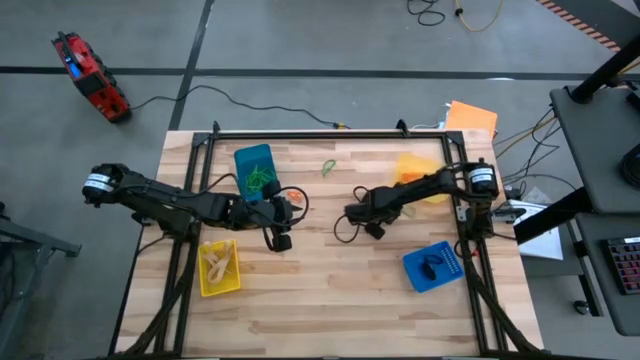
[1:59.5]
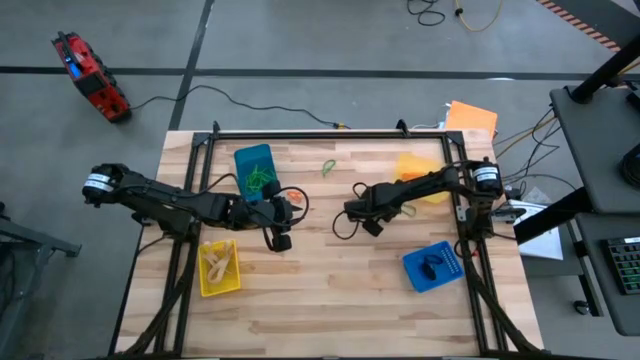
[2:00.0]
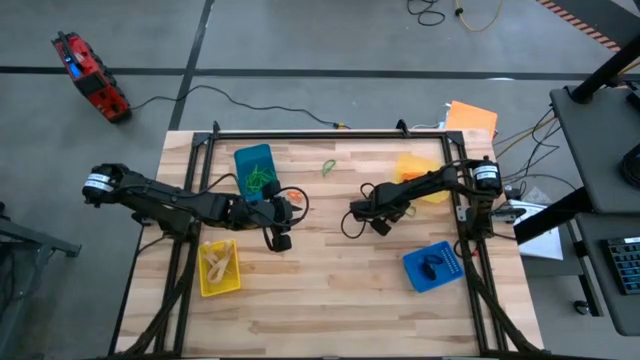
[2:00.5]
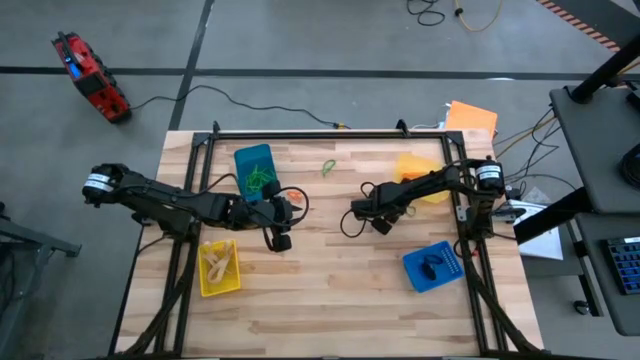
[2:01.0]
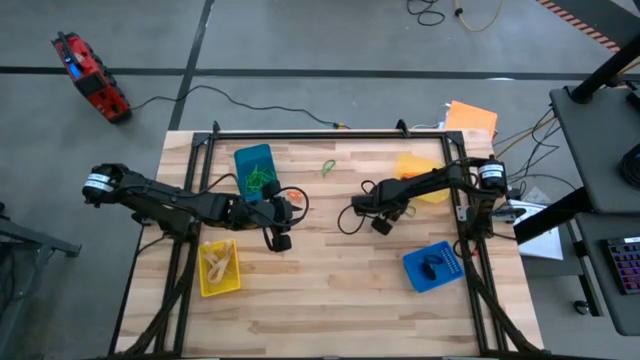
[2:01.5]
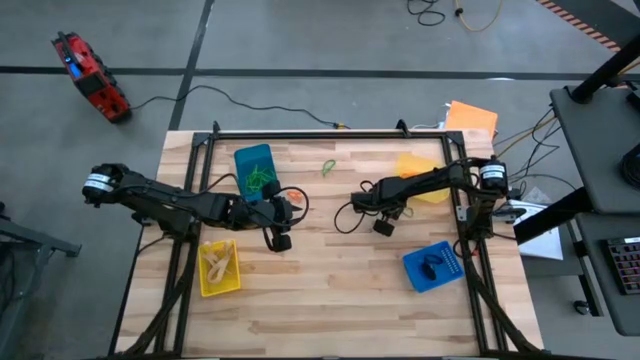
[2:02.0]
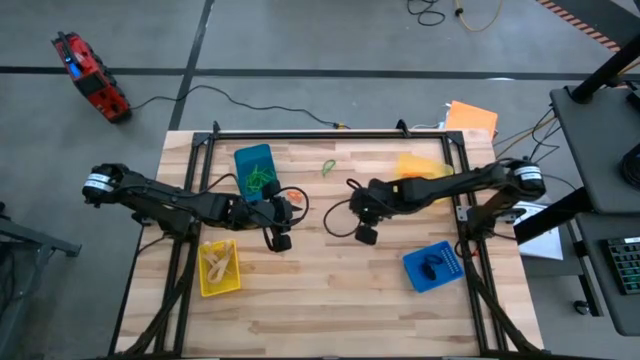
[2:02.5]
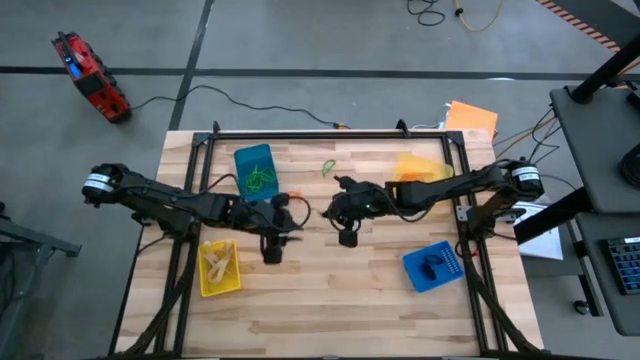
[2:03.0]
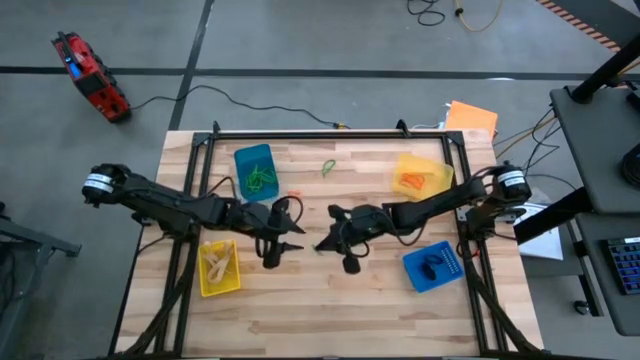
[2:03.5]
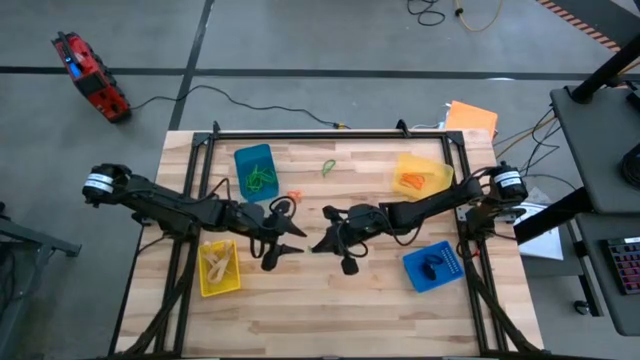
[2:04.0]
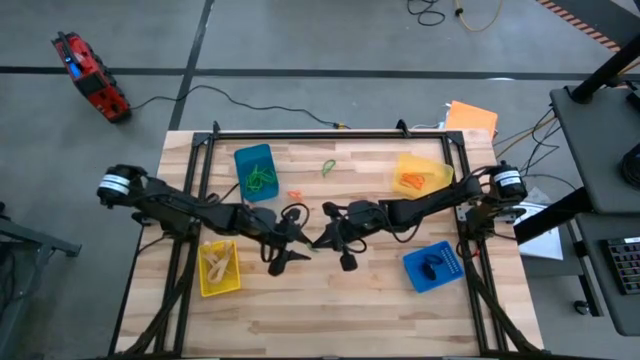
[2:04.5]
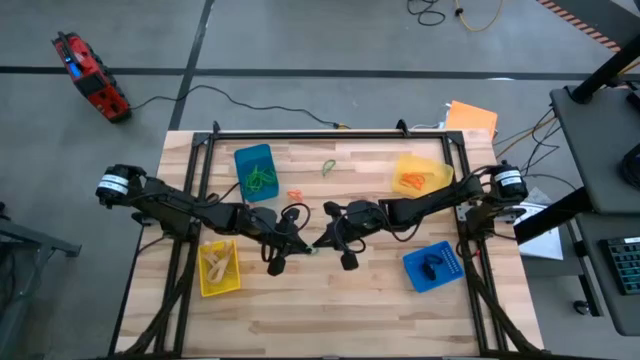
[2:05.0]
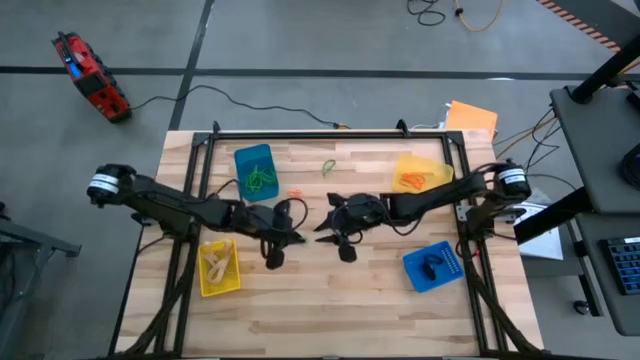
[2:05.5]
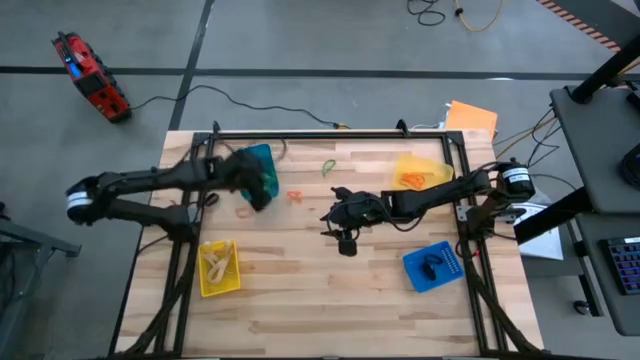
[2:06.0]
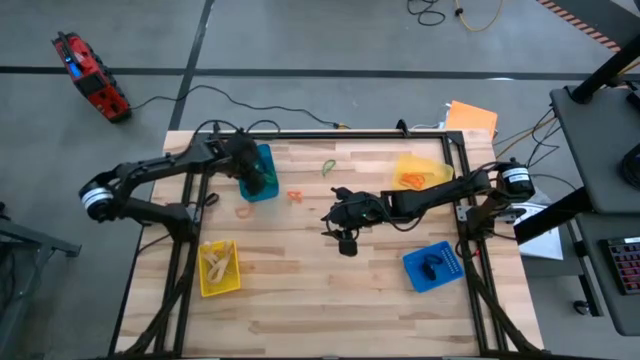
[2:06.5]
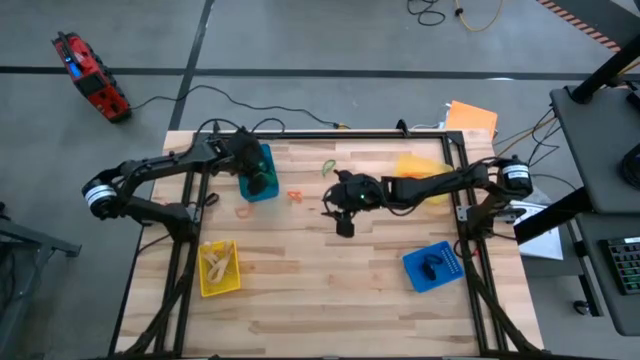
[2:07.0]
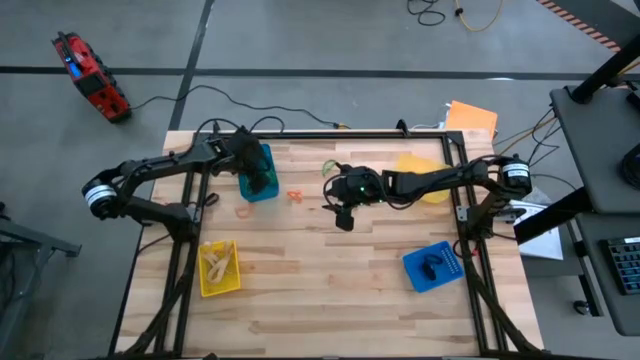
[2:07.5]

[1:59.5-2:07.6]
Task: Sort rubber bands into baskets
Put the green rubber band into the light blue bin

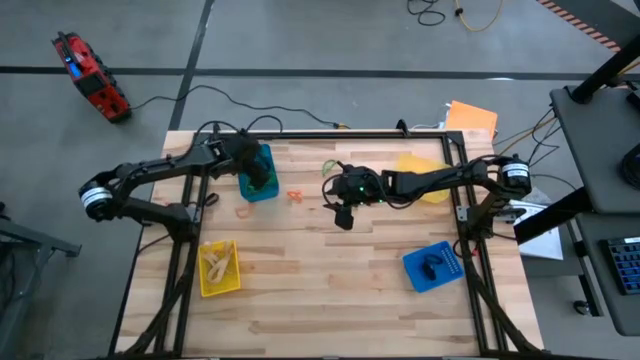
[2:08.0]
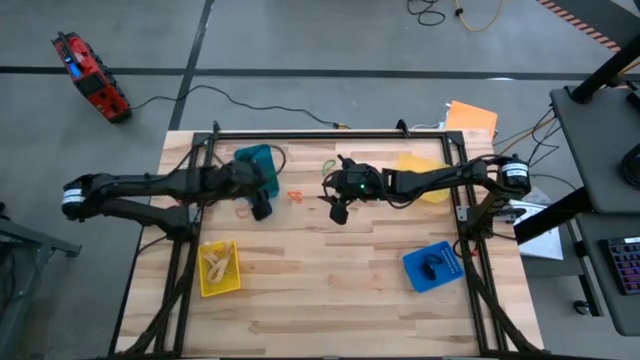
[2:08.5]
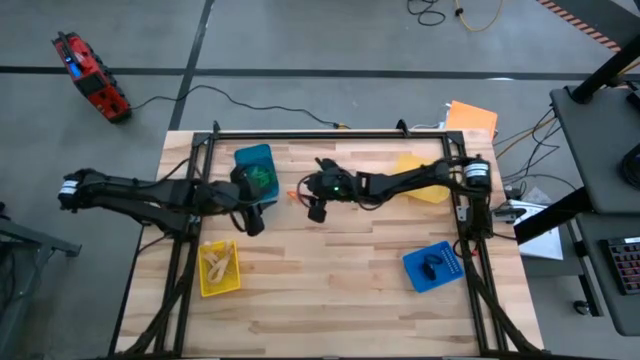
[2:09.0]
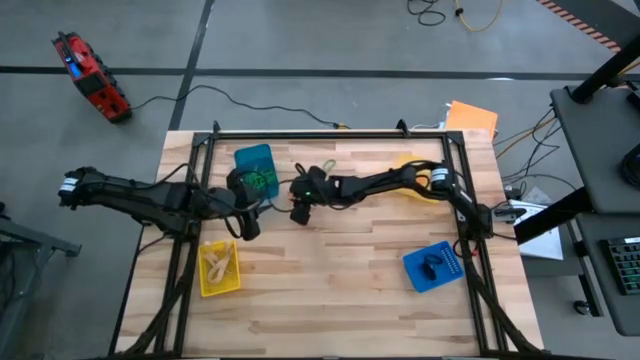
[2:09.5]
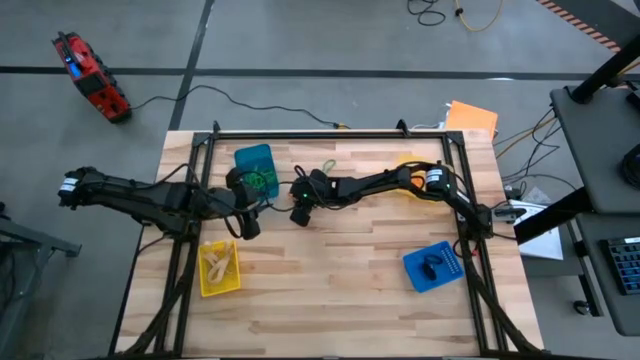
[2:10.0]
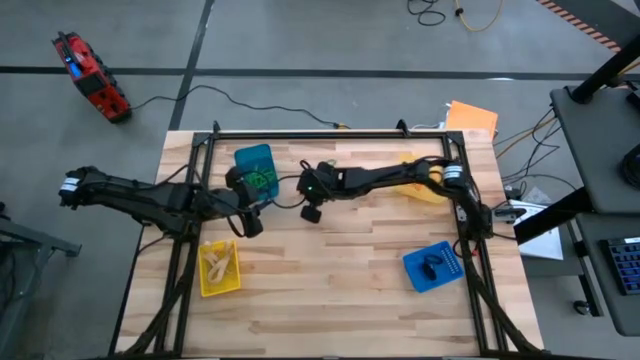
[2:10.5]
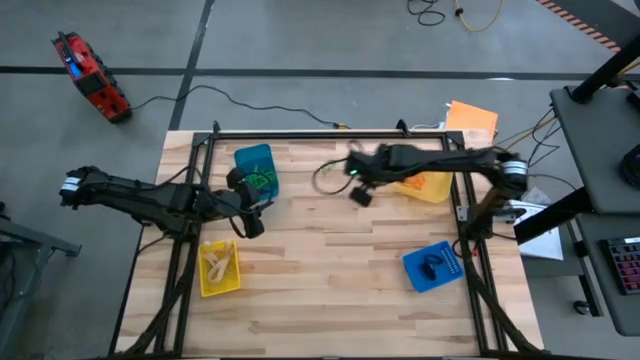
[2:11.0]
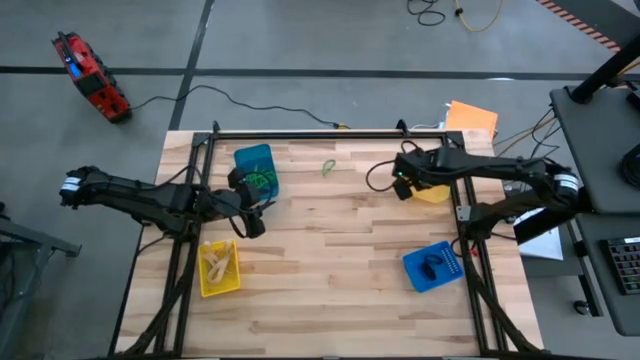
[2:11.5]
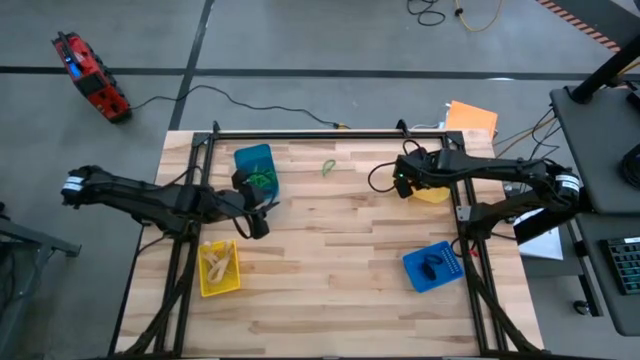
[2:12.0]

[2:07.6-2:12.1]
Put the orange rubber band into the light yellow bin

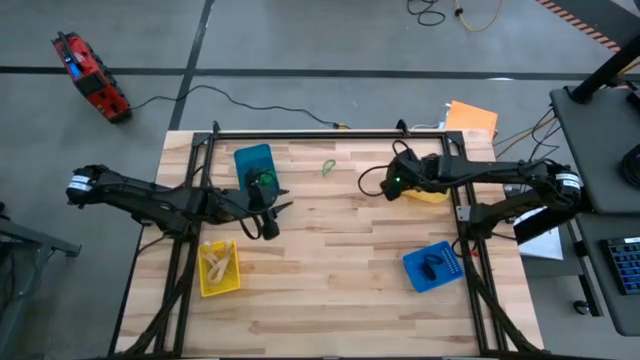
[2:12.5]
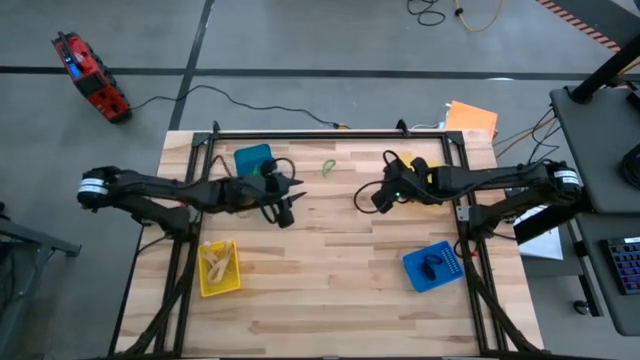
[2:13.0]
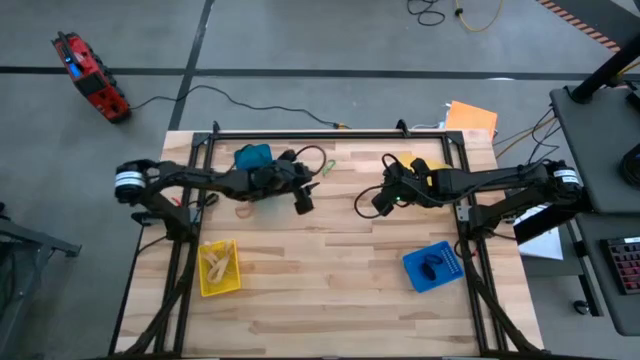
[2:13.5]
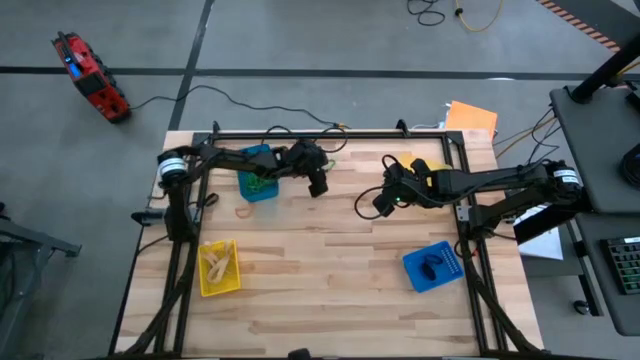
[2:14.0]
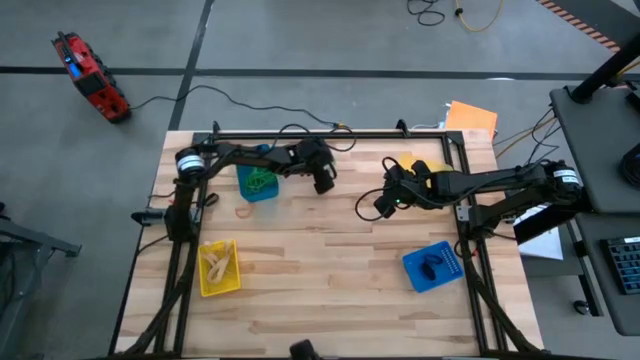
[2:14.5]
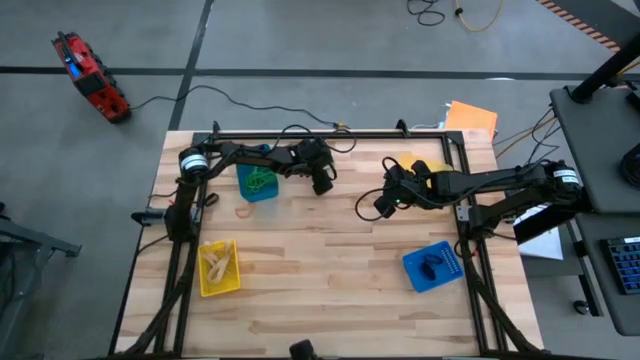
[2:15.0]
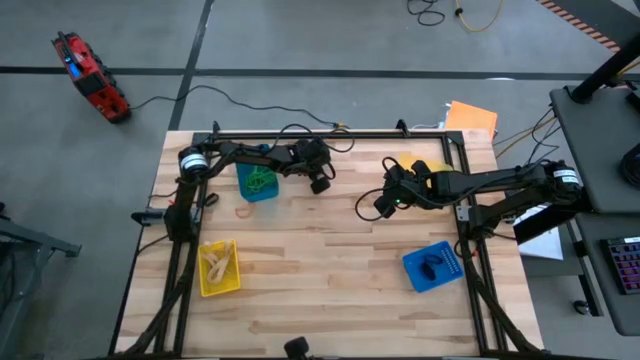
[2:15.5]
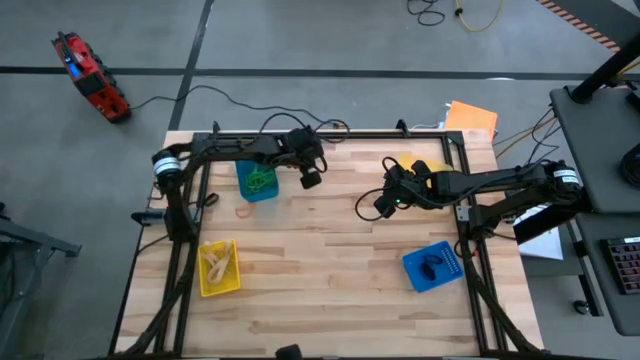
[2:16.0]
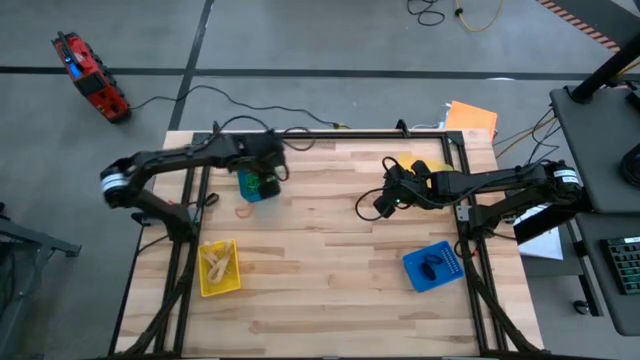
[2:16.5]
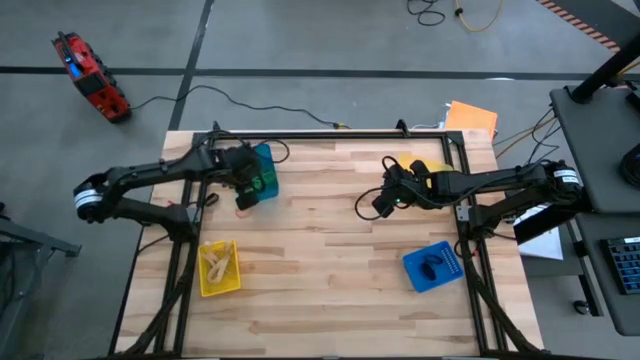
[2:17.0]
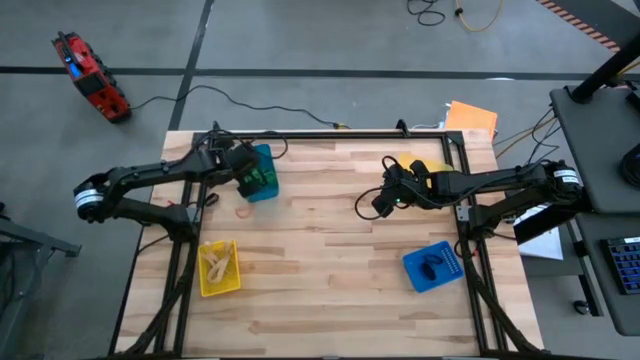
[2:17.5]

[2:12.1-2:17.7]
Put the green rubber band into the light blue bin

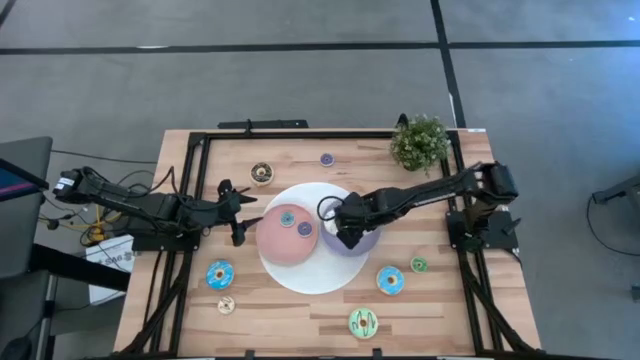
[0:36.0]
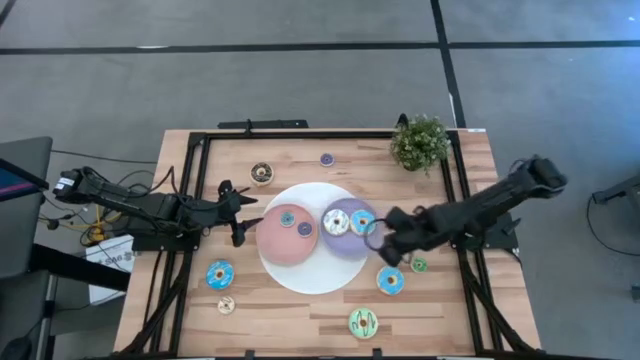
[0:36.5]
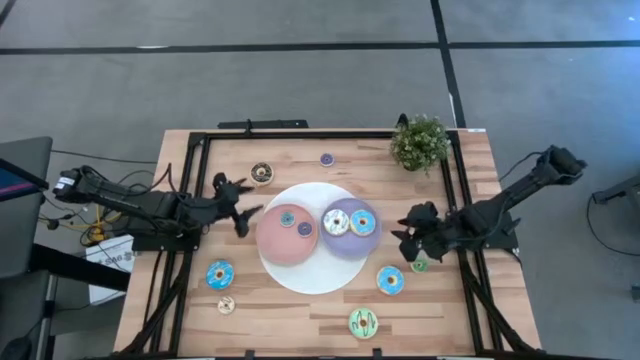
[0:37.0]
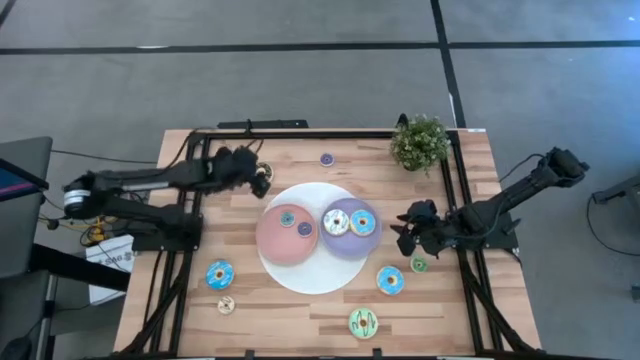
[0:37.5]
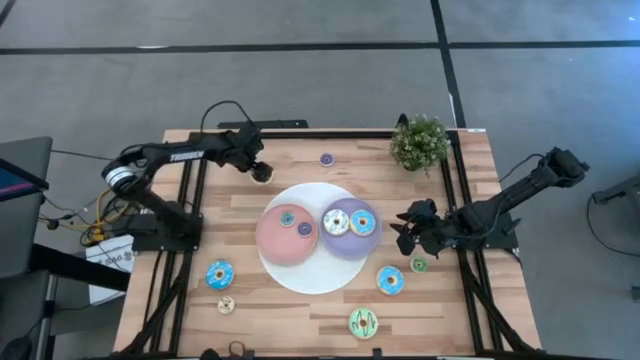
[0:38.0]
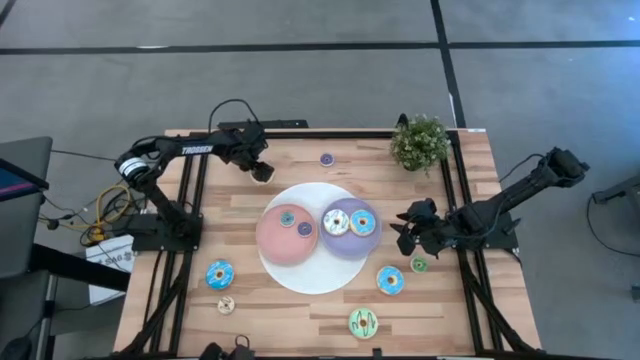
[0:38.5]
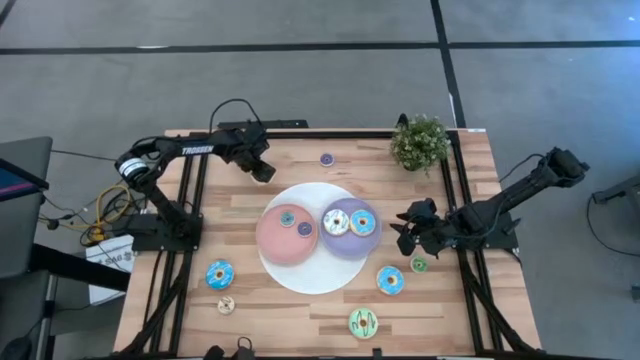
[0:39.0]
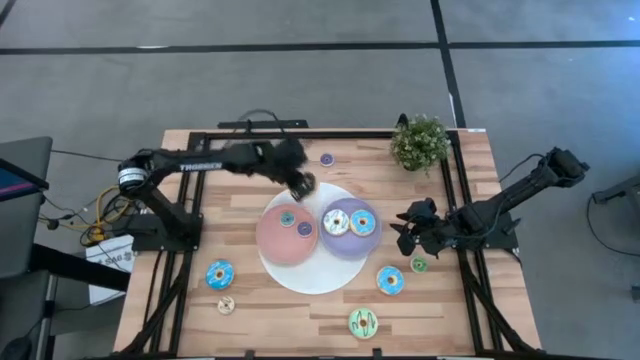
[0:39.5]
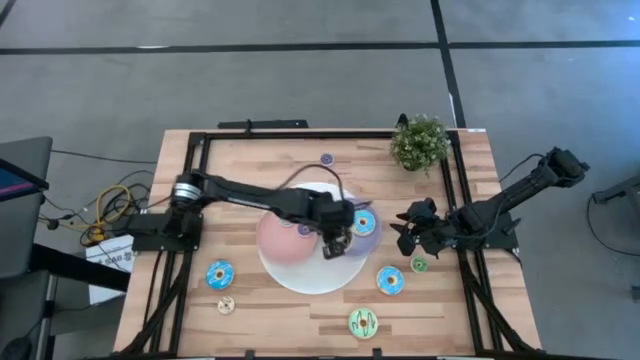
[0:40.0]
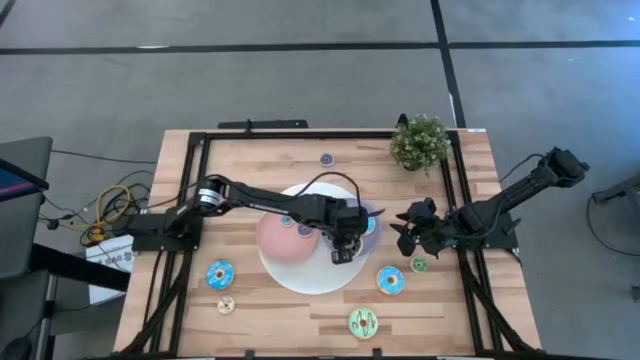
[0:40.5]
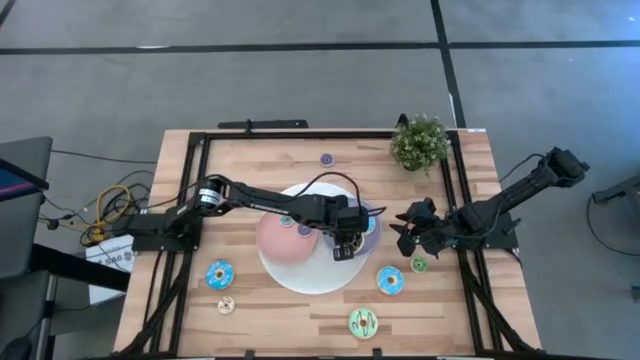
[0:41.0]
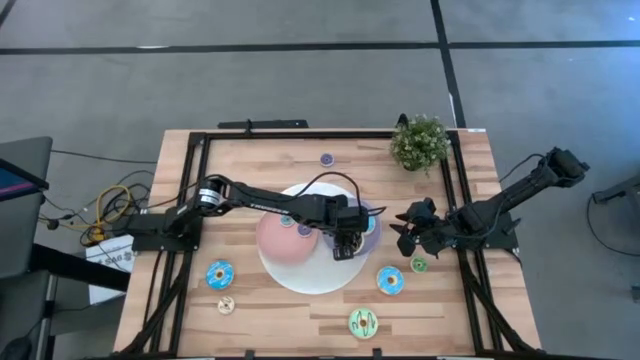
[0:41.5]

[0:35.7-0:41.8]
Task: Pick & Place donuts
Put the big black donut on the violet plate
